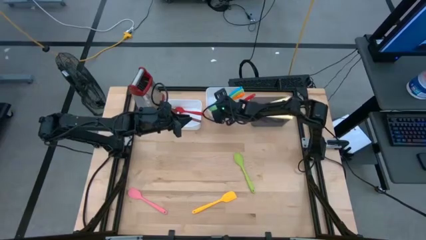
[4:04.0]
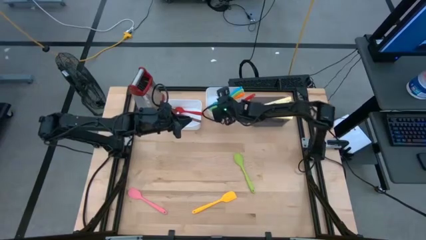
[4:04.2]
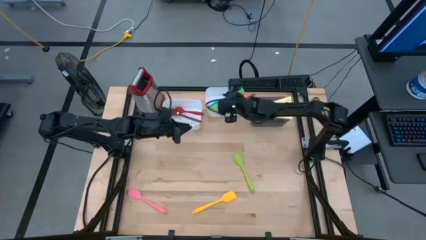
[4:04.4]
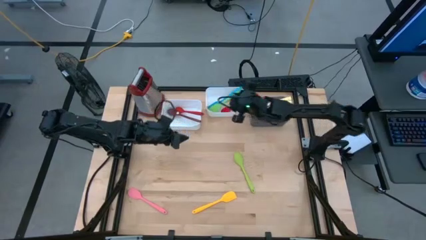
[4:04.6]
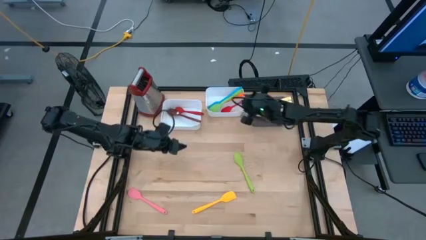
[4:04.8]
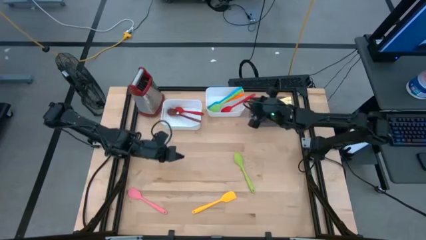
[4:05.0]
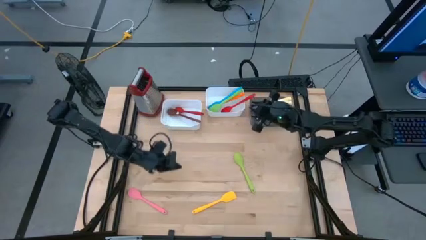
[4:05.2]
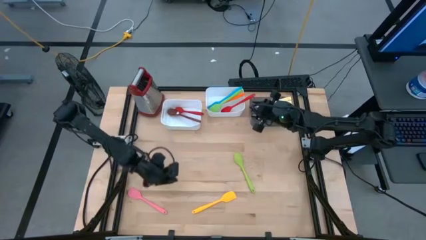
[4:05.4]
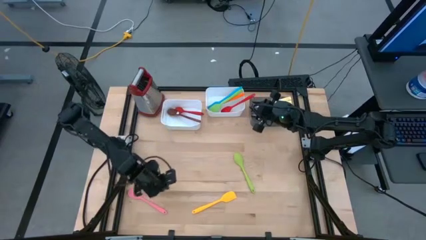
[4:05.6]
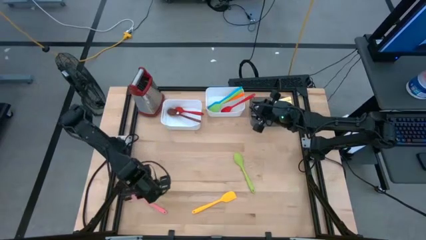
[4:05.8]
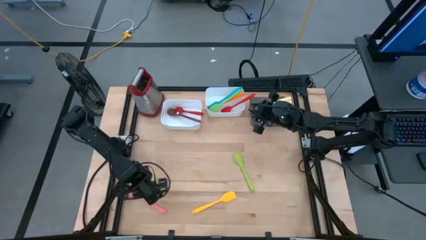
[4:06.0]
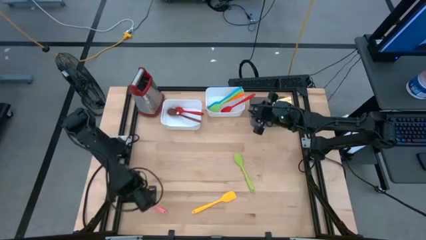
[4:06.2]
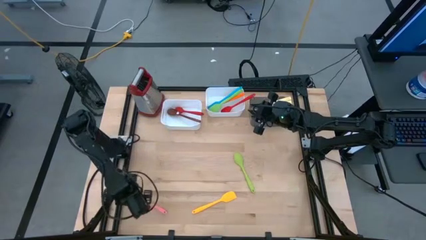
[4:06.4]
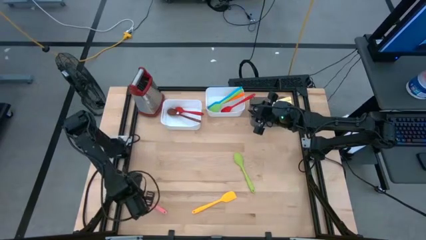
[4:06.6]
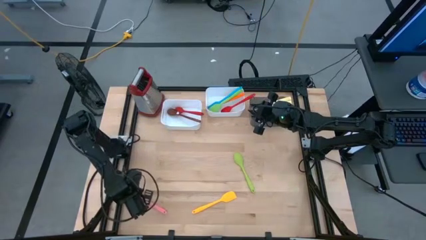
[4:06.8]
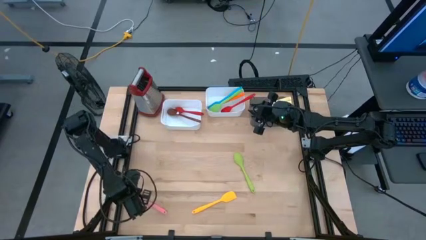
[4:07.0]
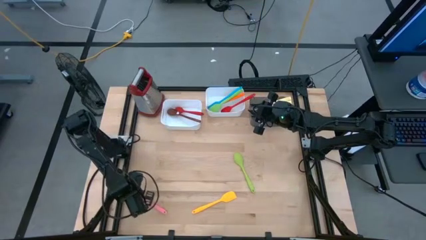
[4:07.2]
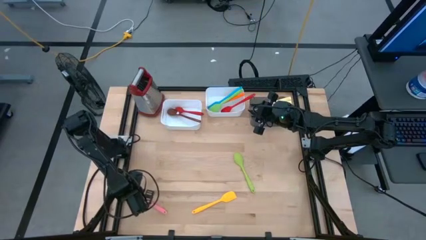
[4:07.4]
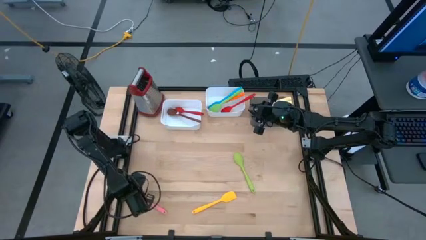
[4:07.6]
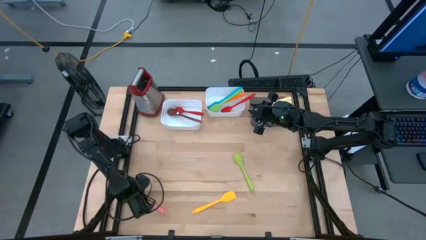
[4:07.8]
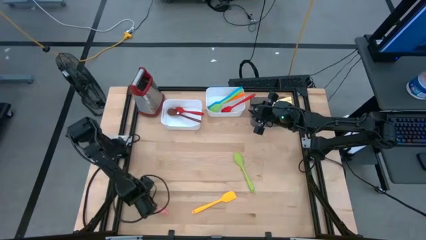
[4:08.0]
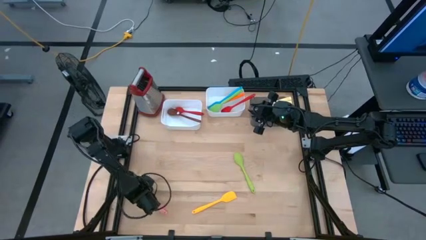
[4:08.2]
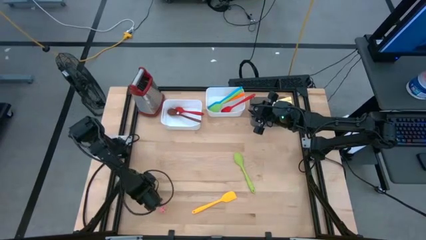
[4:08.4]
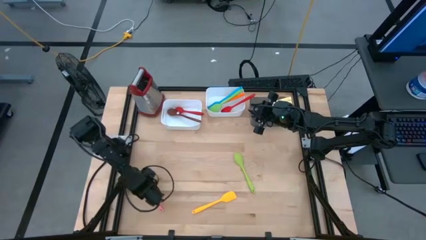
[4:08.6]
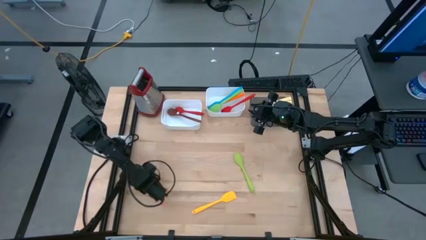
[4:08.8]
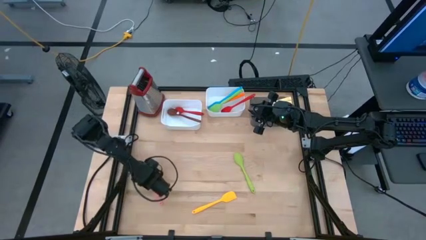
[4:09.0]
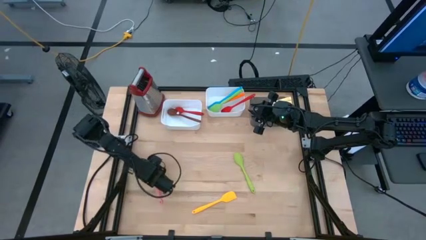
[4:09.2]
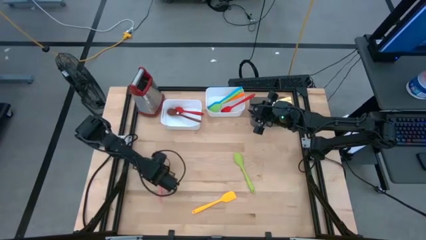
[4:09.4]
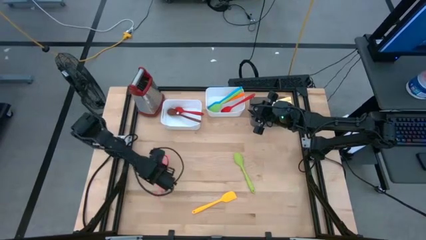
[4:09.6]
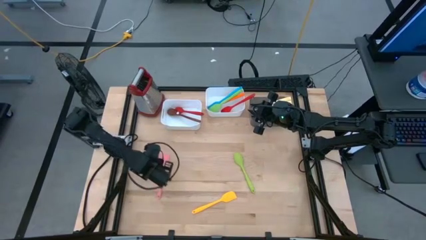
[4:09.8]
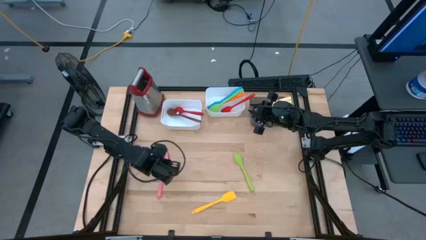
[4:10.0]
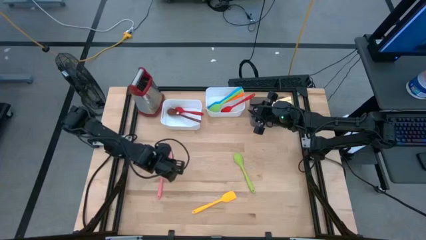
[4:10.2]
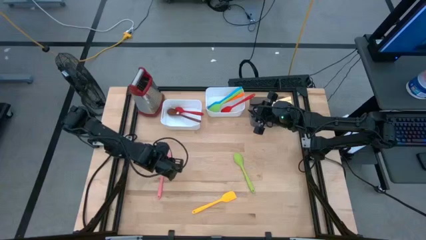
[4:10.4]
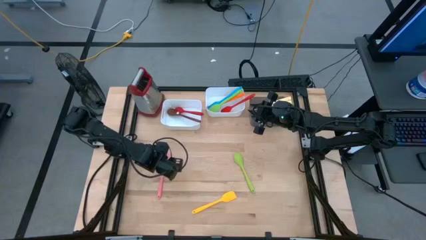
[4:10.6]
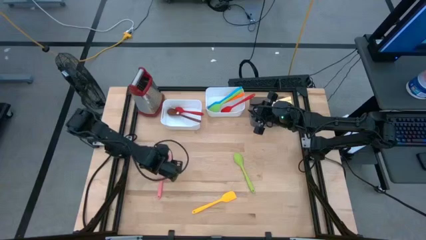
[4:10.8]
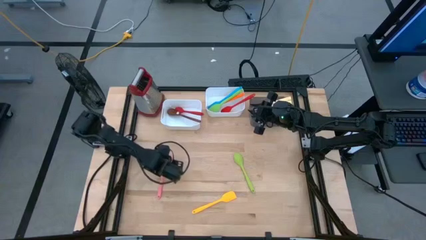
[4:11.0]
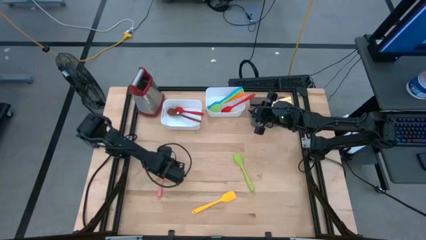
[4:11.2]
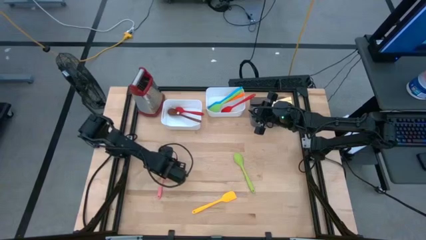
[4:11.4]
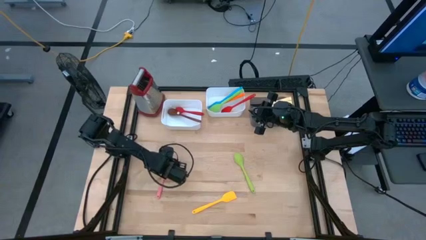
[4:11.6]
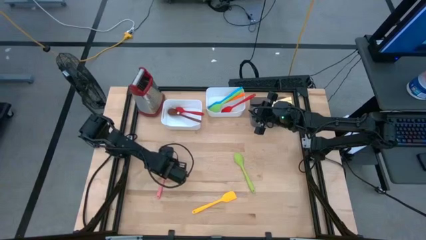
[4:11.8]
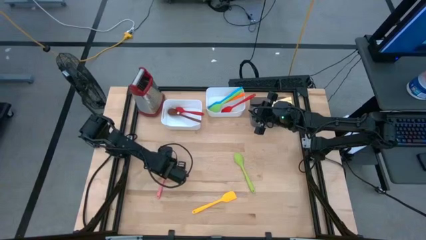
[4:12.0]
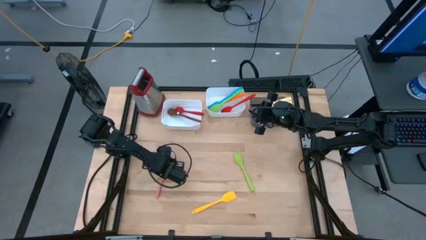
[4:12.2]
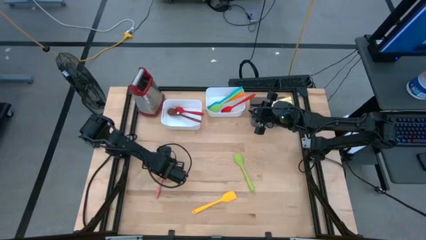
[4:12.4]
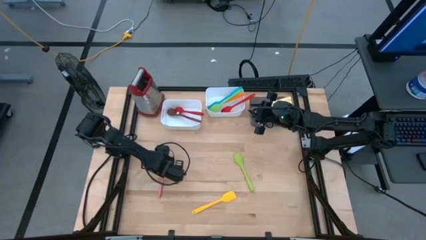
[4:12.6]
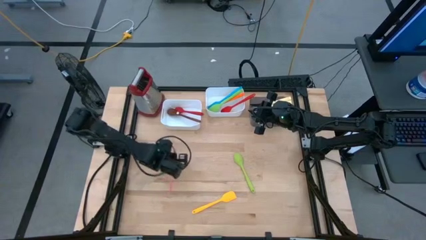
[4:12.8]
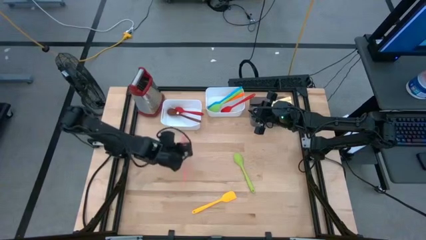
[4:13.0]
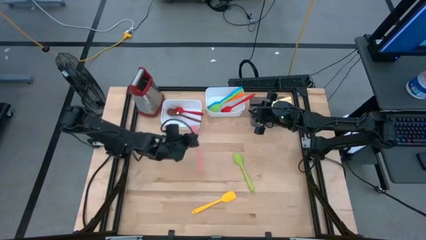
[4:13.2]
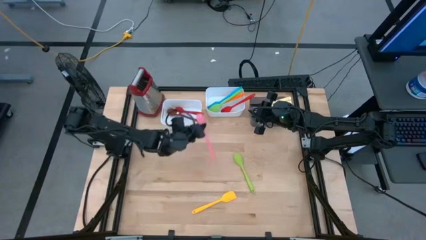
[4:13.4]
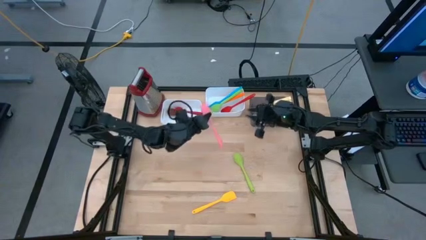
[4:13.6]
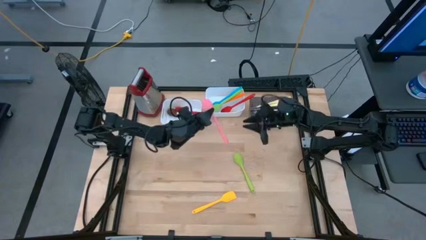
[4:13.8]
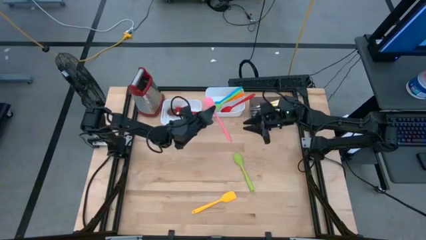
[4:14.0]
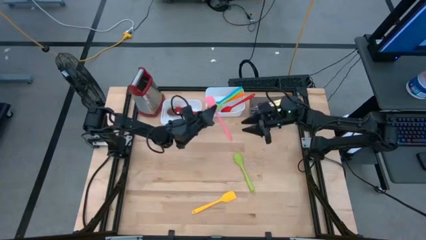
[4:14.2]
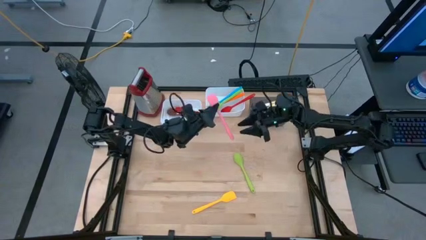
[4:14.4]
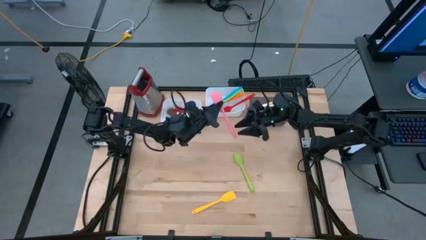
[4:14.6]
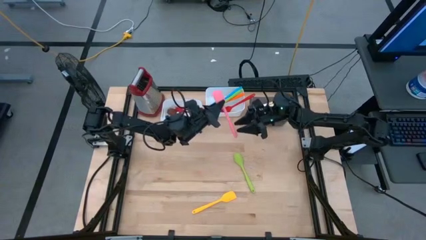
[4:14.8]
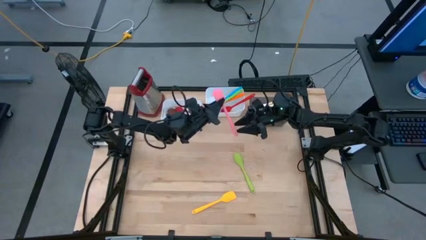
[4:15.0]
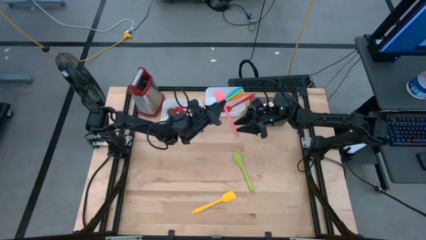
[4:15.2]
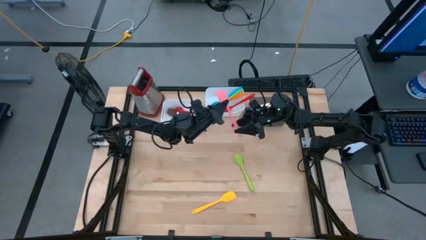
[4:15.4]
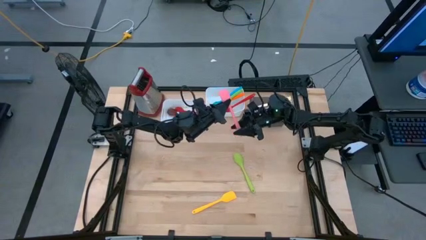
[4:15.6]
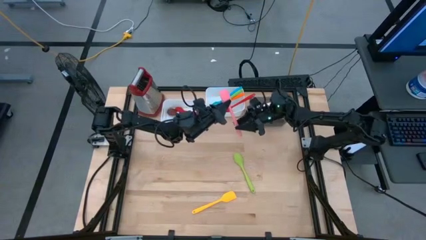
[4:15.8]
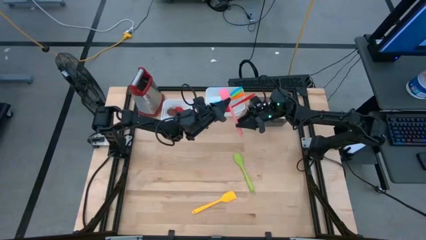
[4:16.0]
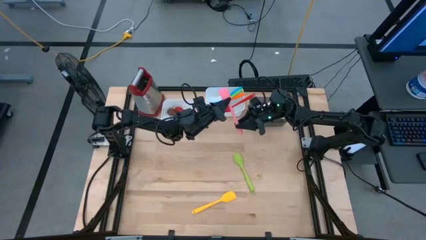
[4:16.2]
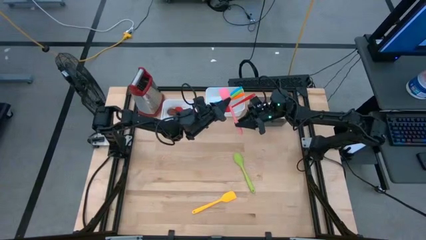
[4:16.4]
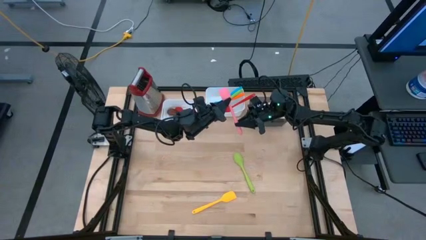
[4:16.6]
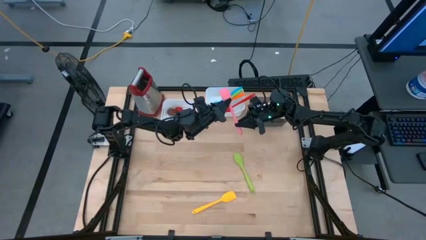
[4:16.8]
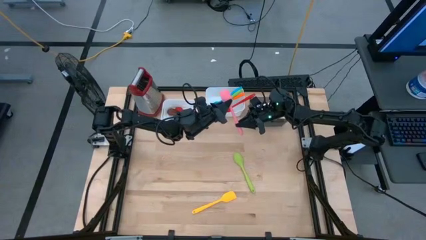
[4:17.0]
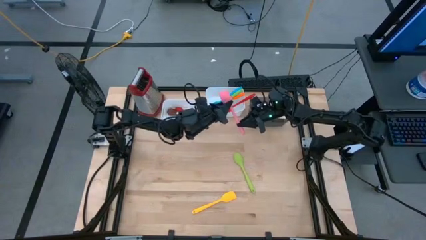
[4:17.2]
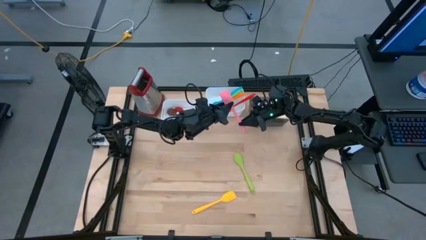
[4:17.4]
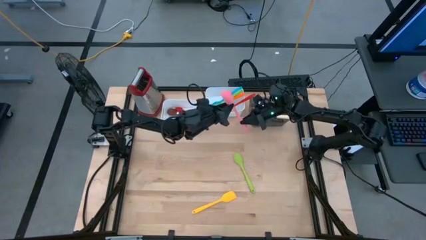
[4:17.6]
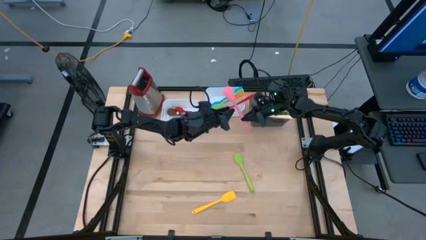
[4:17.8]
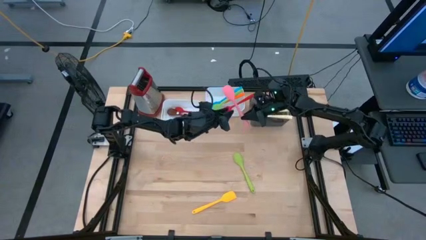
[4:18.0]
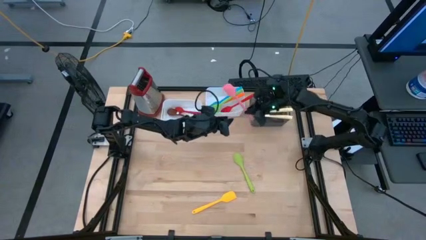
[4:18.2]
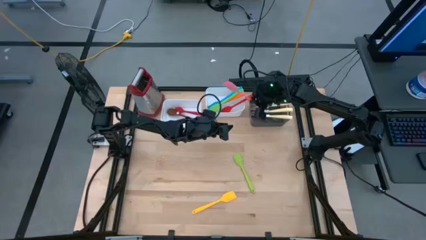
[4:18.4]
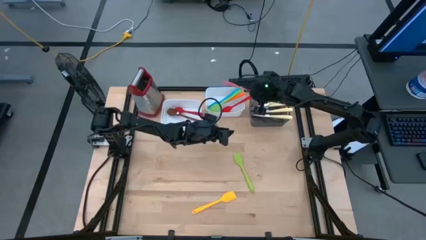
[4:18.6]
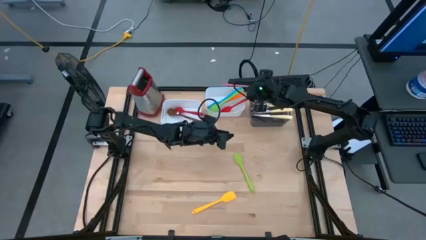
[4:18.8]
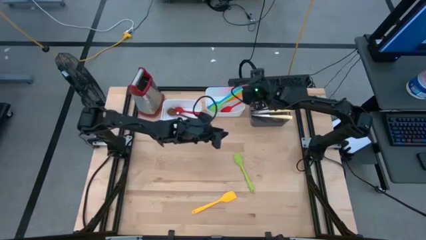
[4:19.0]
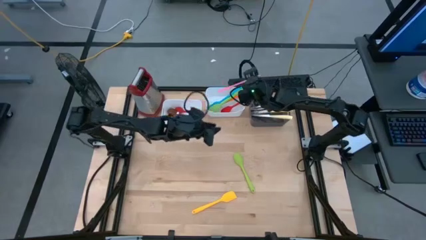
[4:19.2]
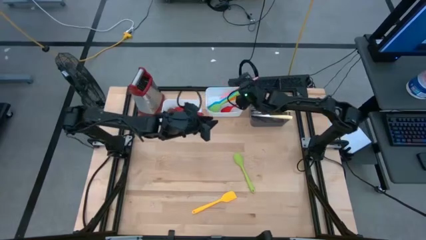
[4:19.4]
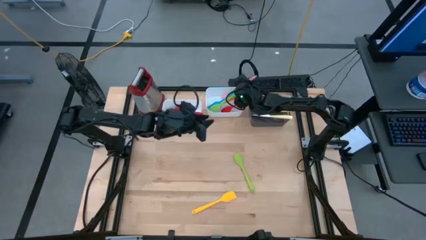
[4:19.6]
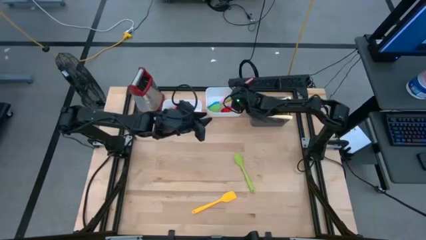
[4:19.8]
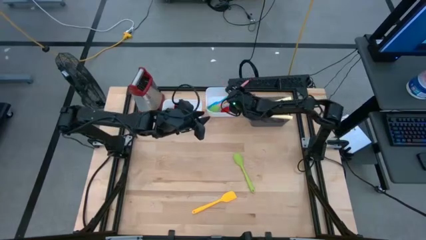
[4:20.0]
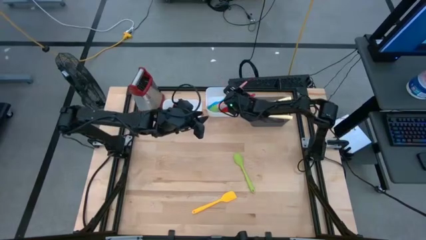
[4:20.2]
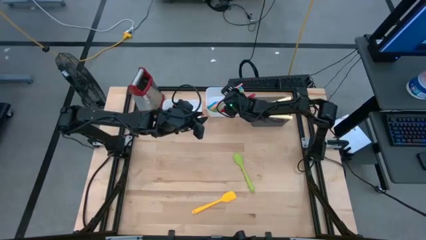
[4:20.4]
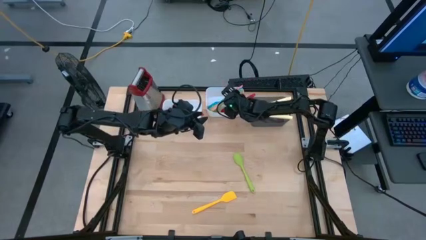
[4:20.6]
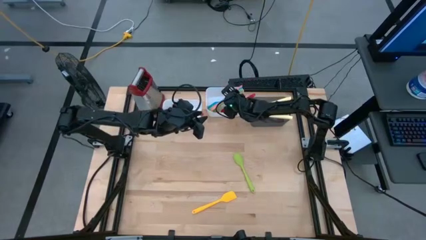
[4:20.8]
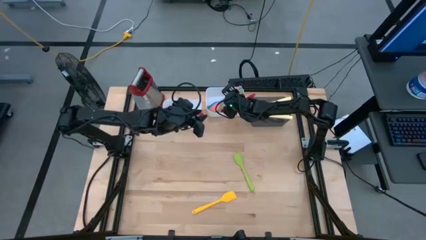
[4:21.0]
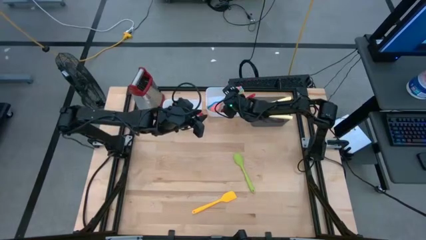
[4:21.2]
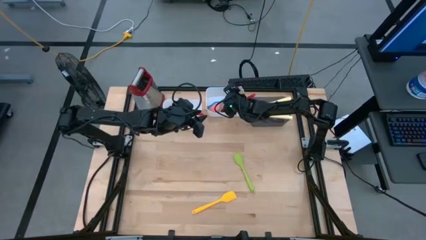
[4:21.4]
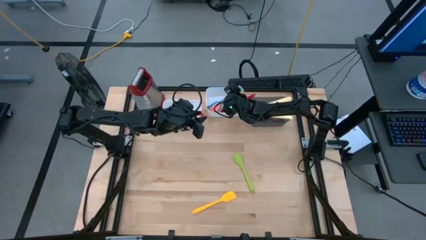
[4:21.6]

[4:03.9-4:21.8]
Task: Pick & Place Kitchen Items
Put the pink spatula into the right white bin
